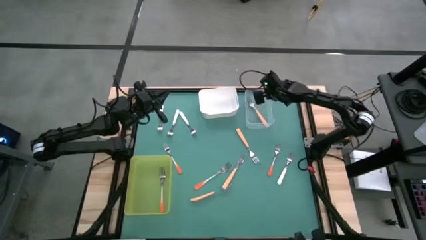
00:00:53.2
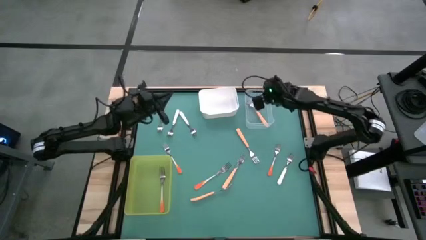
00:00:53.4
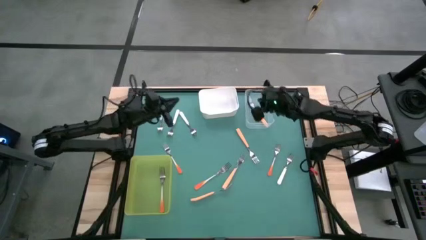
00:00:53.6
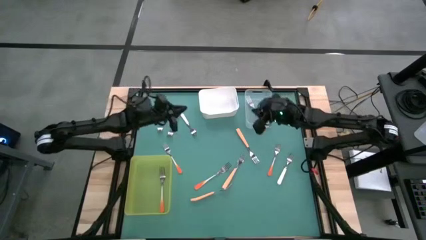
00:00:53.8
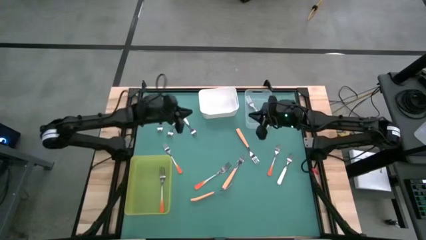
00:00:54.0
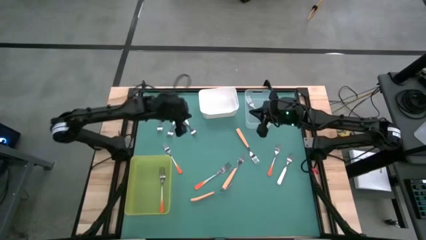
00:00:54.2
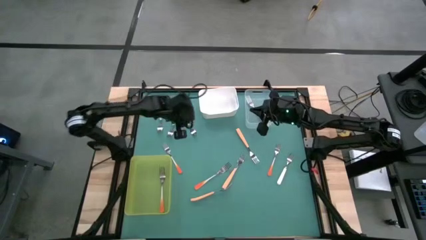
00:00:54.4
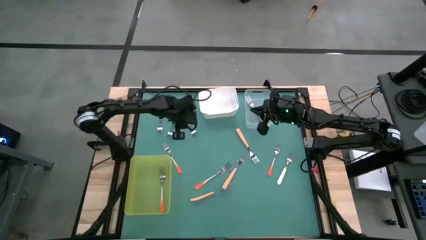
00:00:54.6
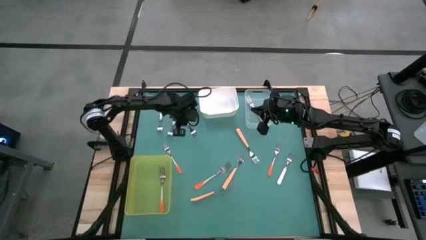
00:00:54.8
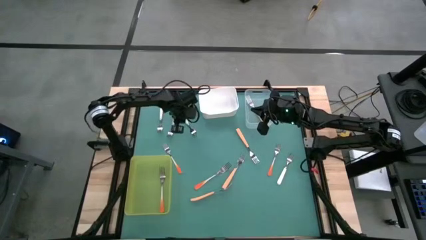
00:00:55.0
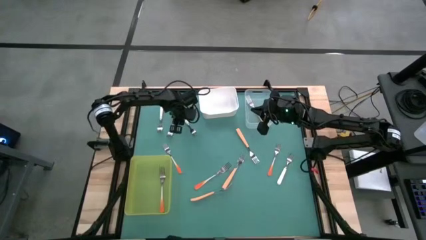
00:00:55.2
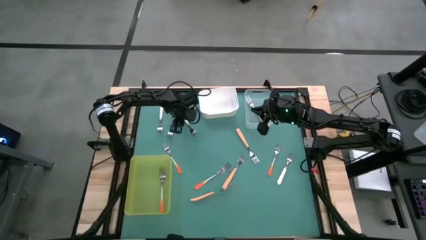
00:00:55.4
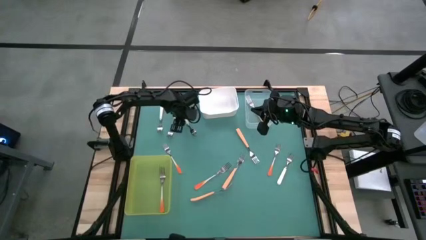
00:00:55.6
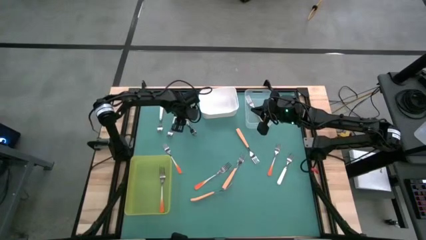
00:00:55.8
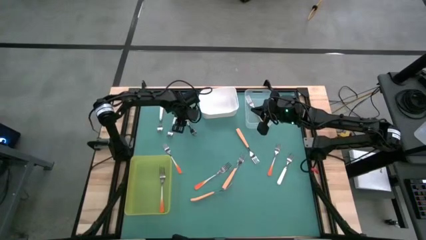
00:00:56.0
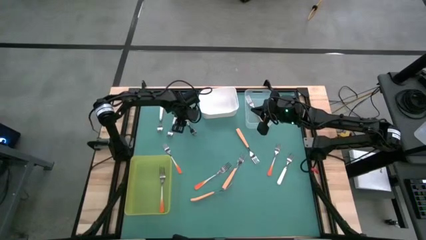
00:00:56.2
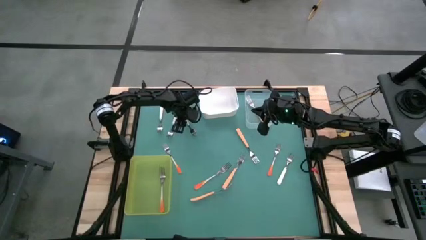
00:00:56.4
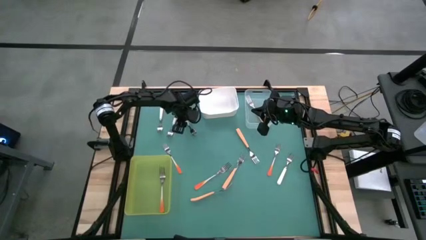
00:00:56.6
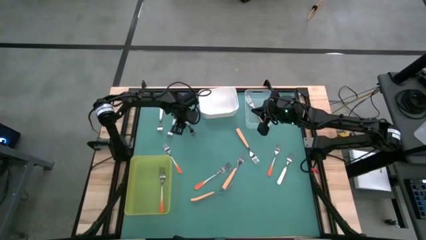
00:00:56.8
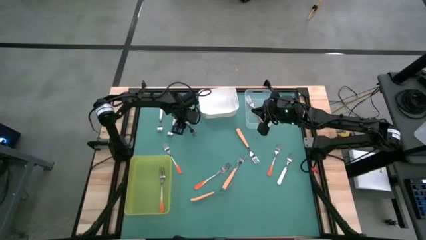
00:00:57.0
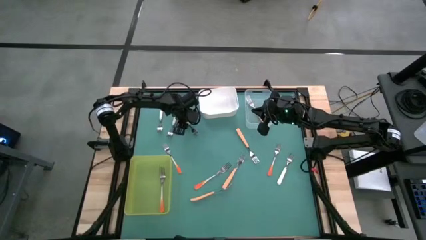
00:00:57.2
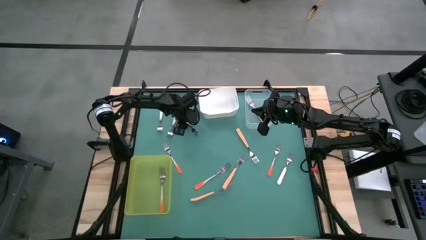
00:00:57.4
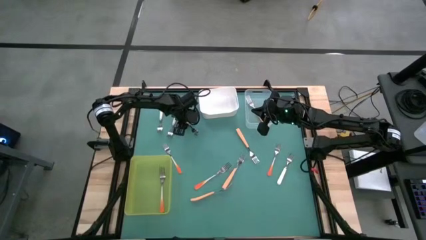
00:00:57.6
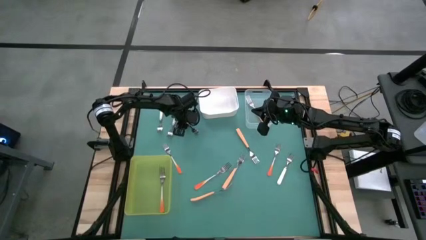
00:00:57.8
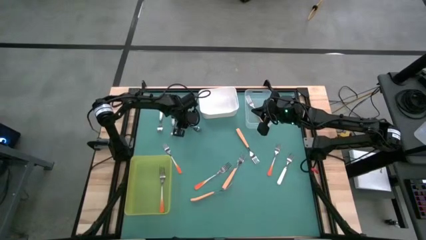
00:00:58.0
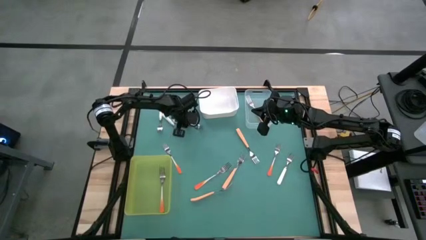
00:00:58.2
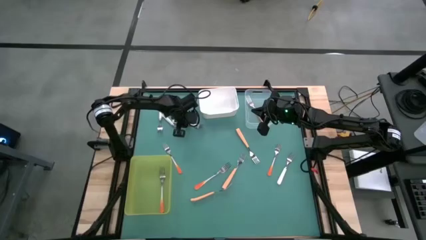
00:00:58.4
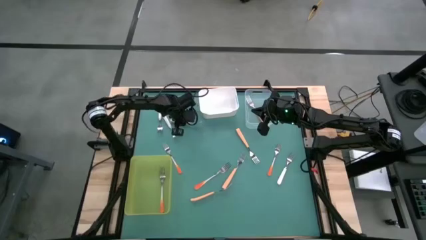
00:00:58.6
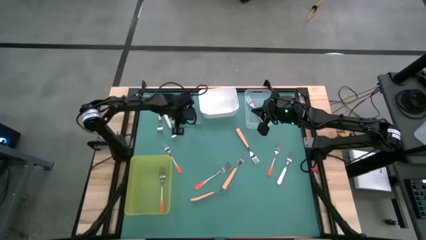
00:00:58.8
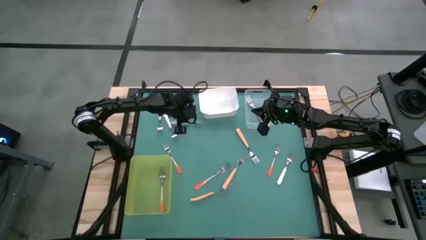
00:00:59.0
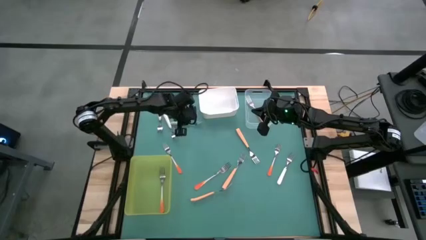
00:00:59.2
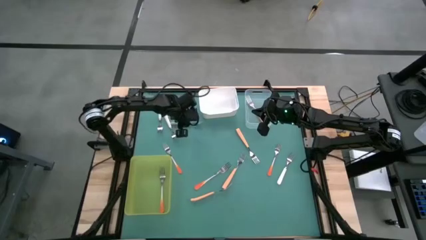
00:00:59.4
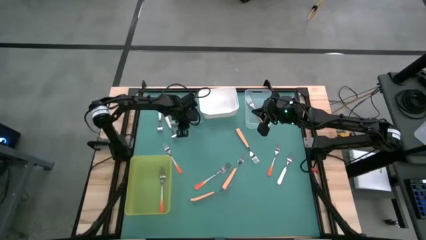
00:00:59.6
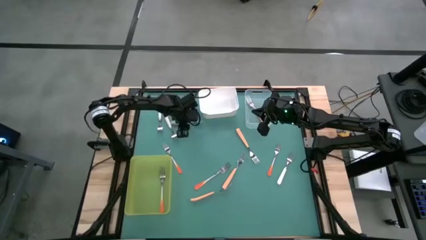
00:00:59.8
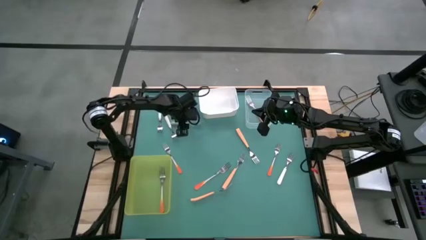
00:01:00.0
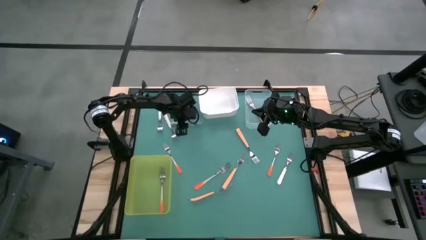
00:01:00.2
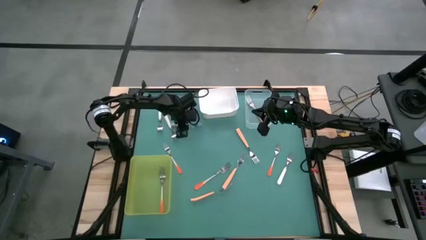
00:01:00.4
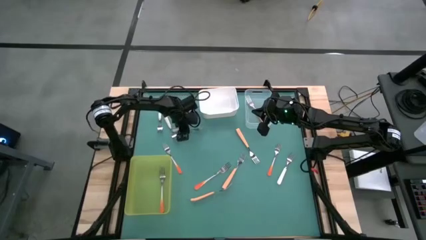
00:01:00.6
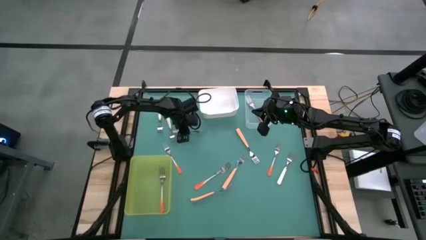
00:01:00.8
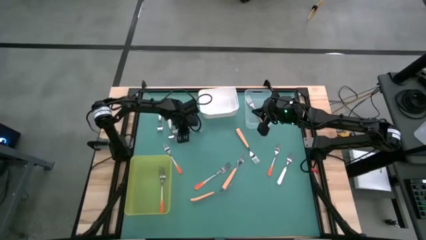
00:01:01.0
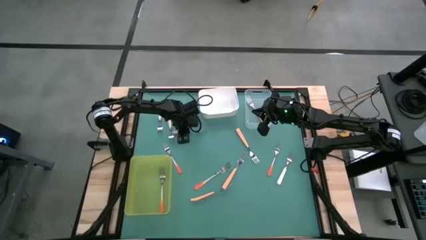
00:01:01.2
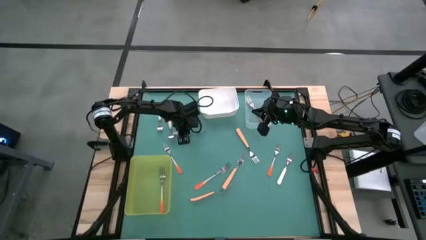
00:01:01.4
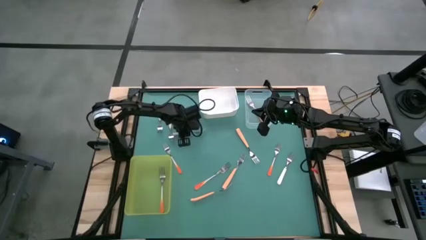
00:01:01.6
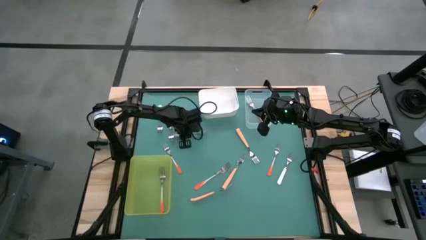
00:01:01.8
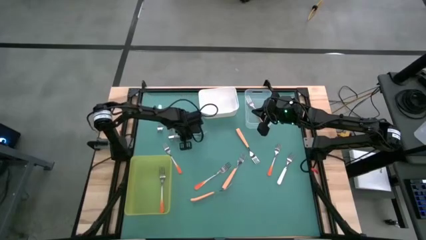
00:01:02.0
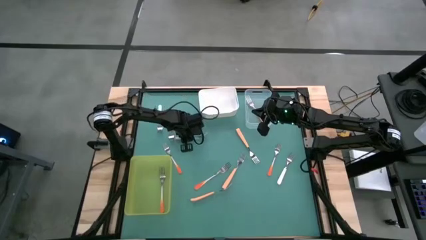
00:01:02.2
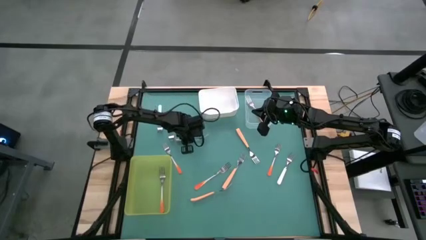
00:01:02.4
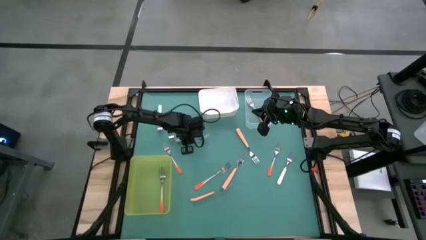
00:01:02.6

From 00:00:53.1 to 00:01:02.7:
Task: Sort silverware by color (type)
Put the white fork into the white bin

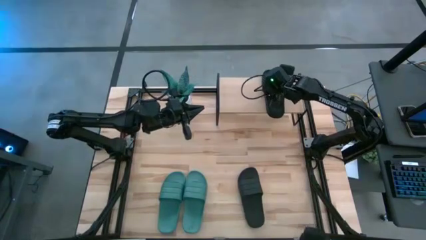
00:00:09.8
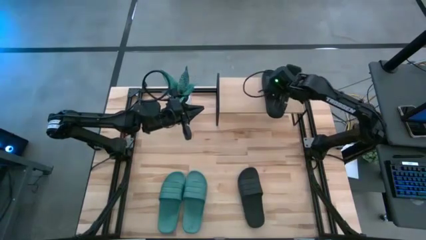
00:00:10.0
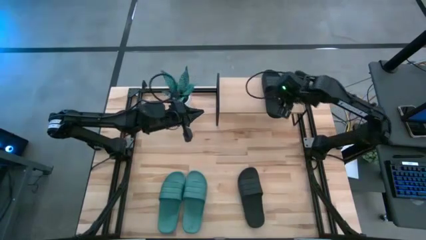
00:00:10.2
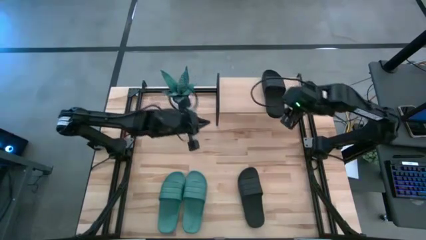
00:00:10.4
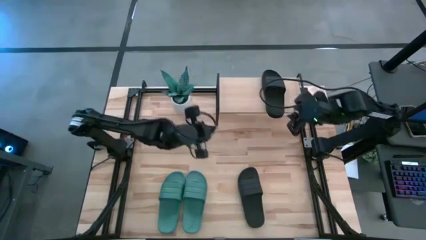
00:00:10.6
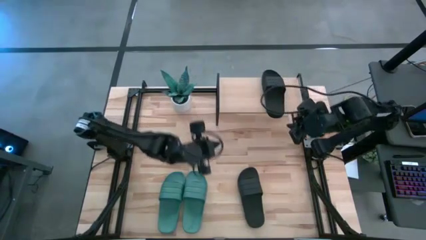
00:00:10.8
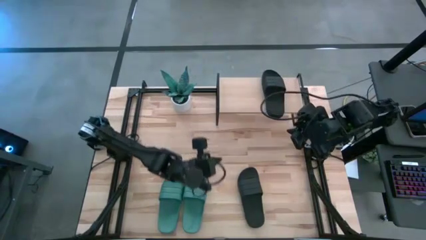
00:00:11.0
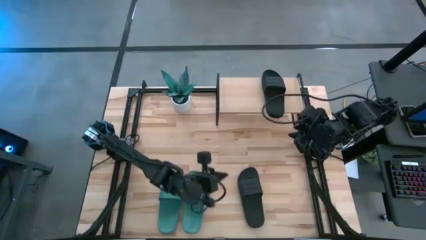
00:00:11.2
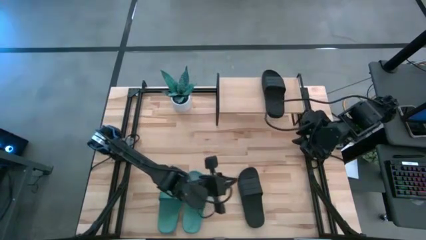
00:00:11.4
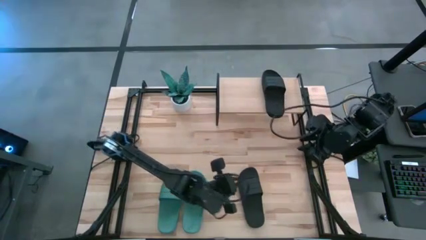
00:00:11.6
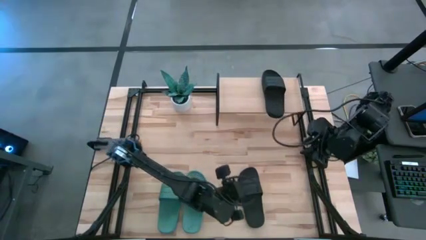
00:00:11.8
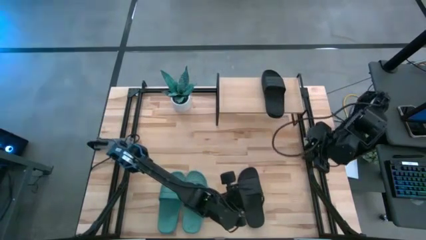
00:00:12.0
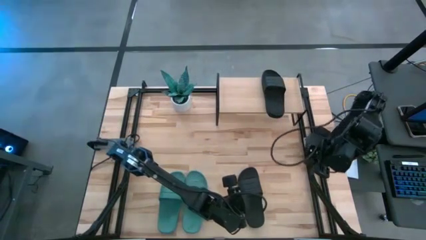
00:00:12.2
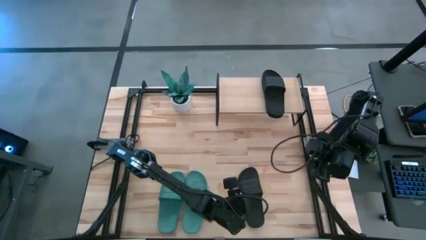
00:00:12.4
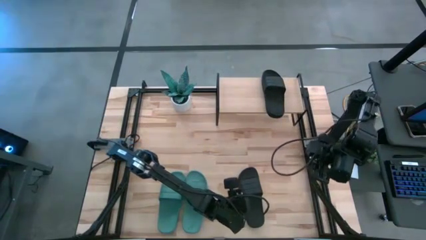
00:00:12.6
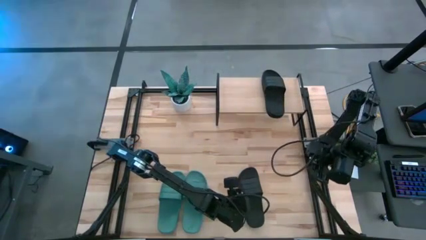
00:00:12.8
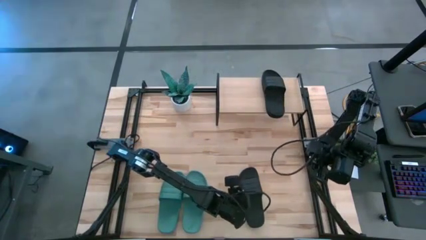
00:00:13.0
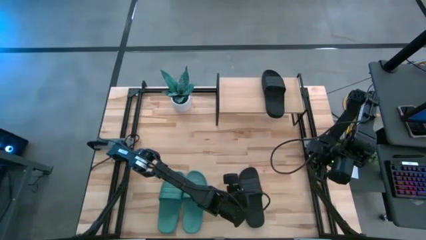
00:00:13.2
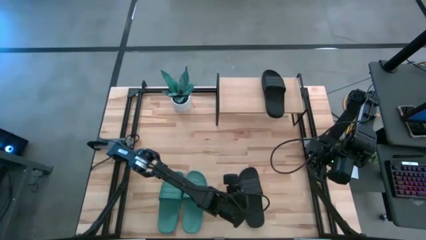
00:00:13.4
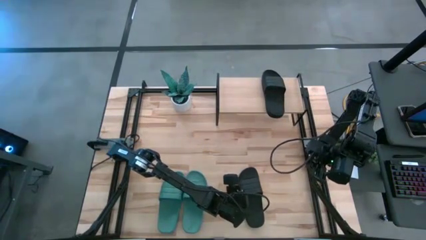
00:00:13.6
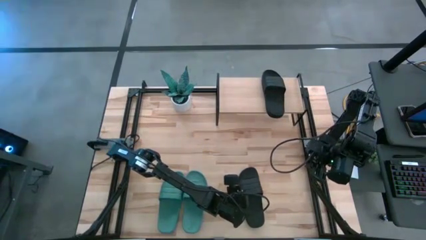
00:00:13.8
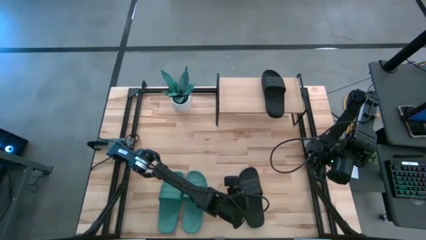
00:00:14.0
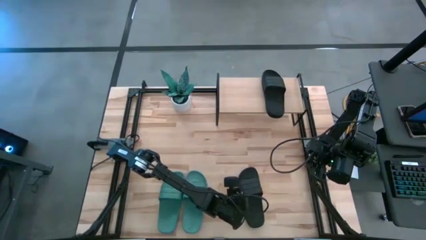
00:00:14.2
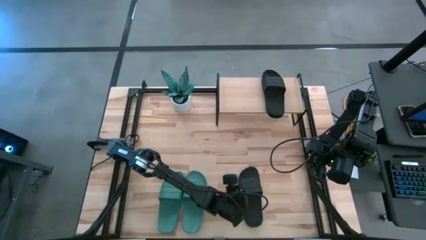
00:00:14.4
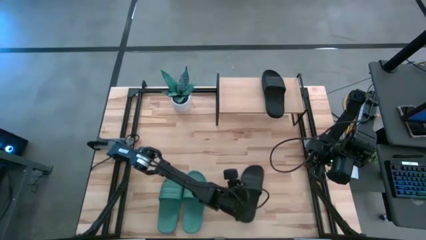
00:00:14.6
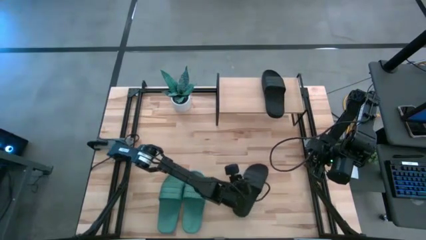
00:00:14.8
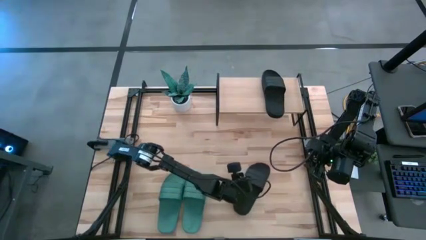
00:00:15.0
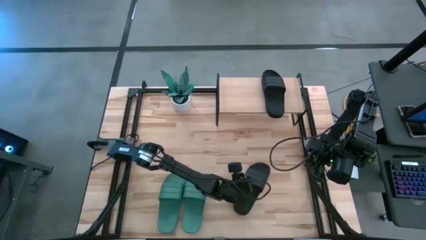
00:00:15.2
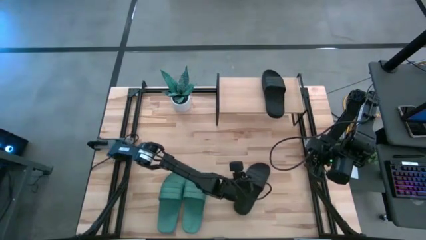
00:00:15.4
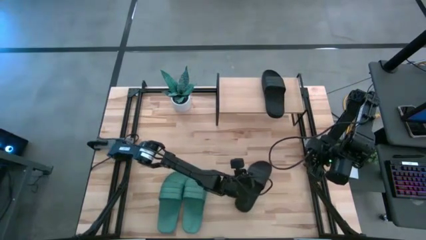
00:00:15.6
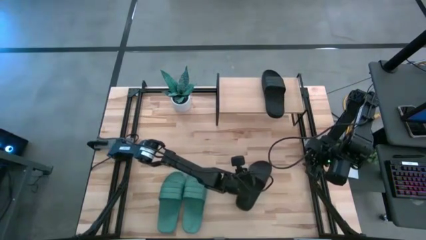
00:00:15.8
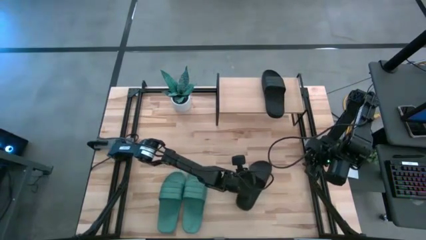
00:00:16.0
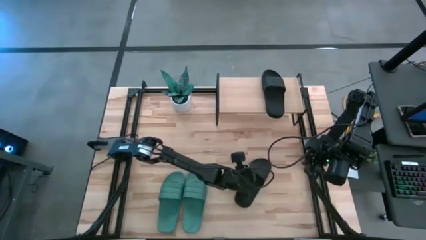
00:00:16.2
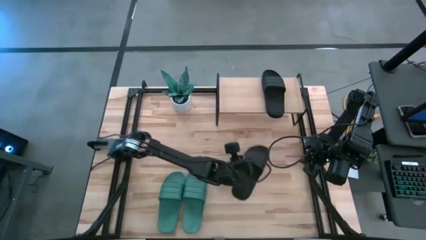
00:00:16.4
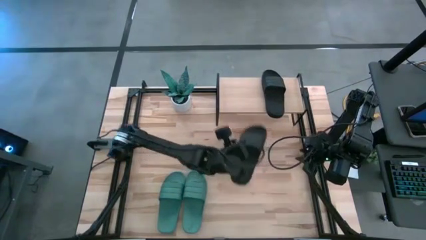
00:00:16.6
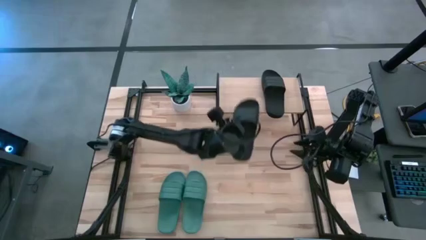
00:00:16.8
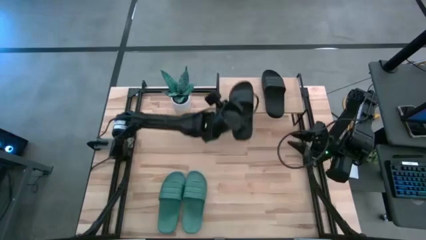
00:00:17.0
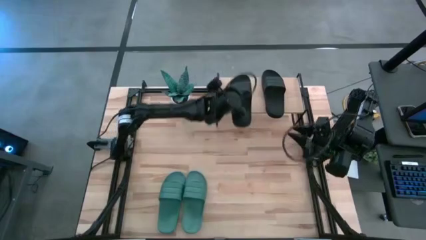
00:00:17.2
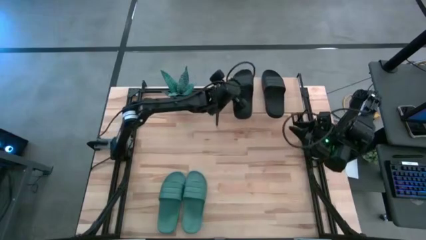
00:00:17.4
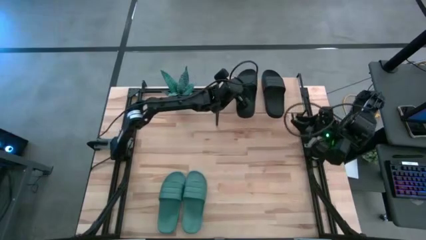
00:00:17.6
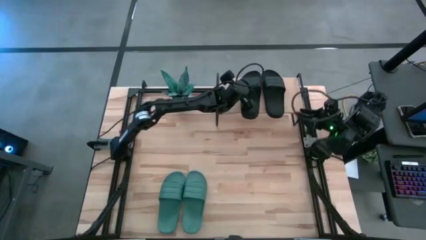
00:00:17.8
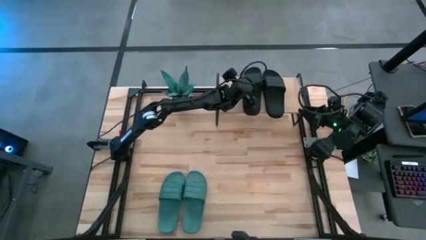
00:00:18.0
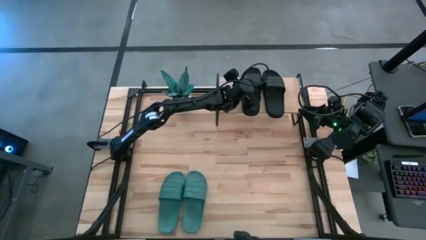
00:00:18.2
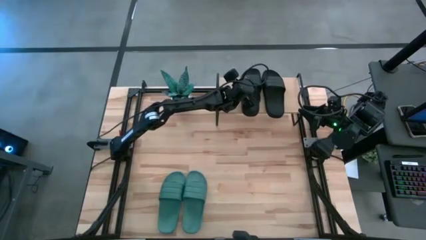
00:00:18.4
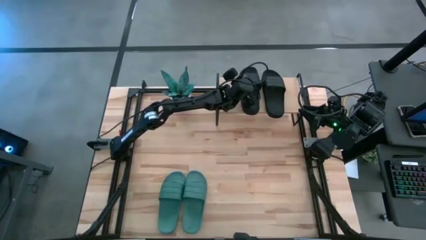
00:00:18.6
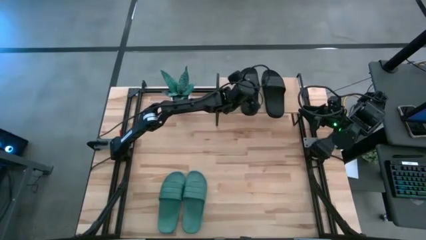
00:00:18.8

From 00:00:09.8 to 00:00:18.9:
Task: Pick and place slides into the shelf
Put the black slipper on the shelf
